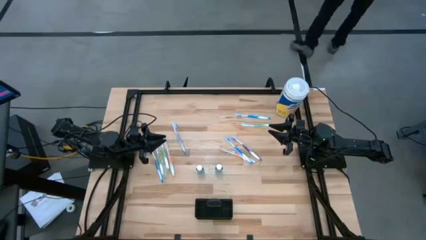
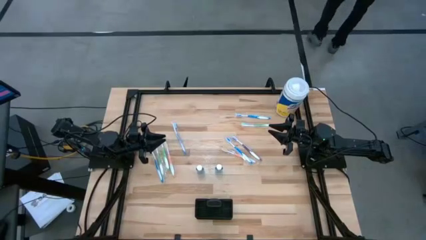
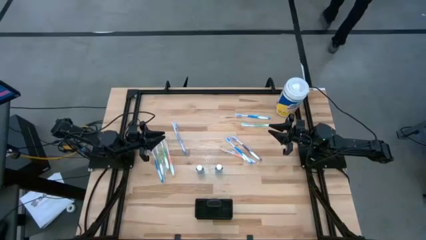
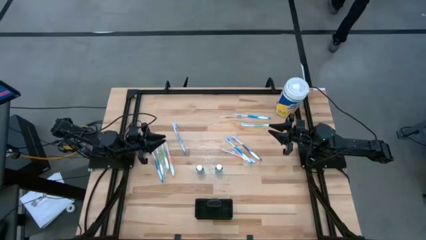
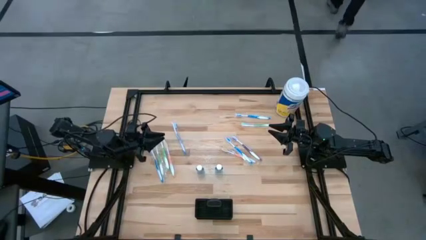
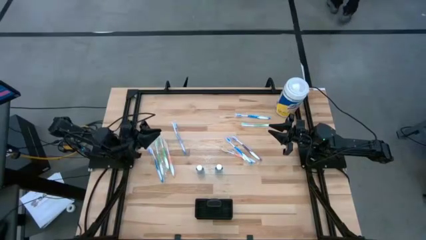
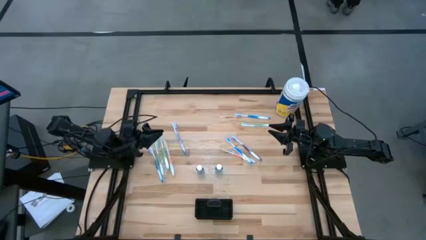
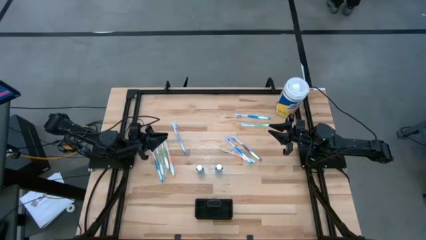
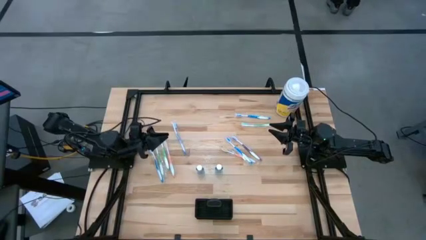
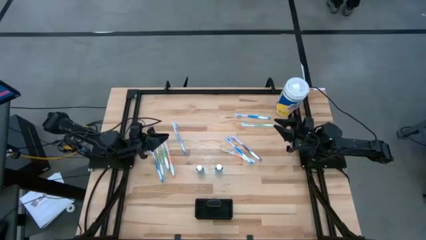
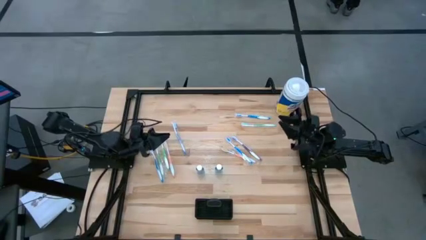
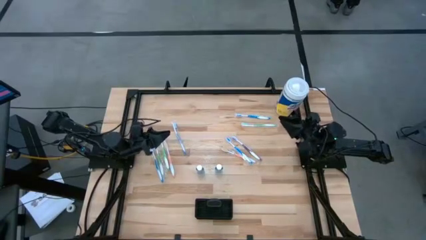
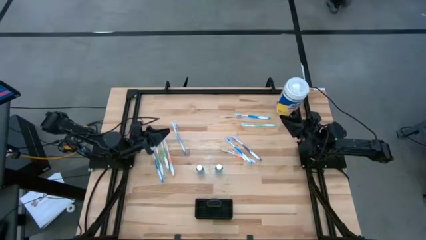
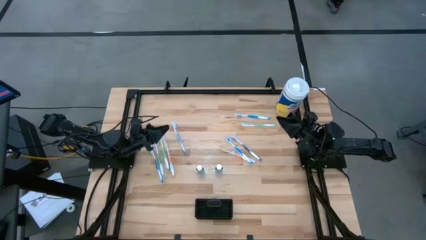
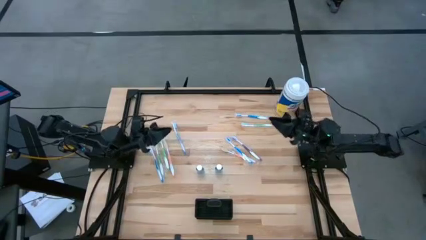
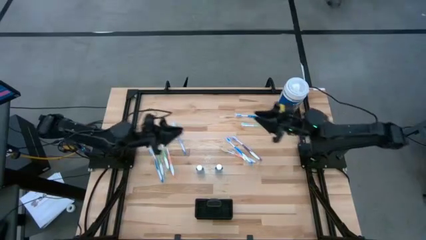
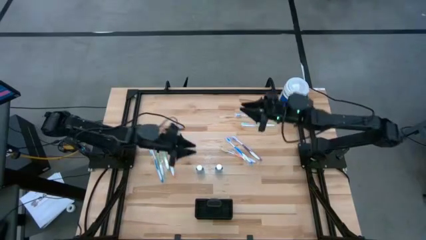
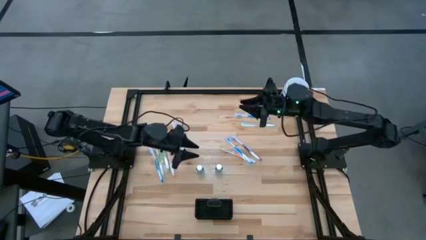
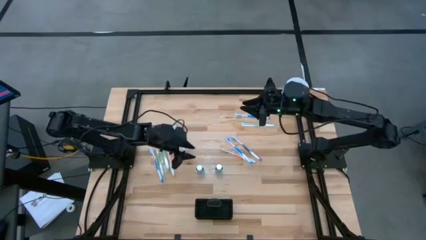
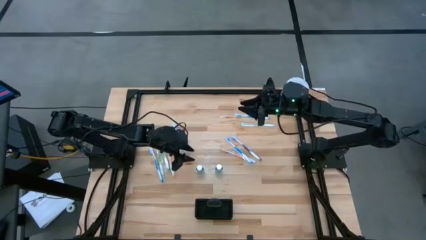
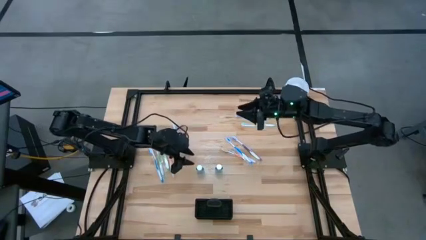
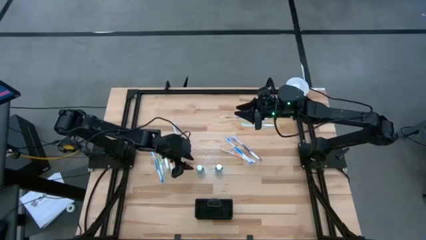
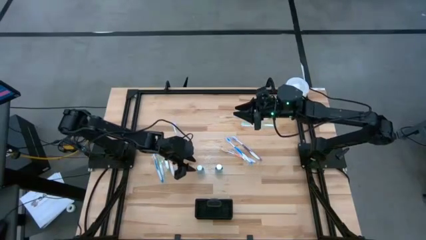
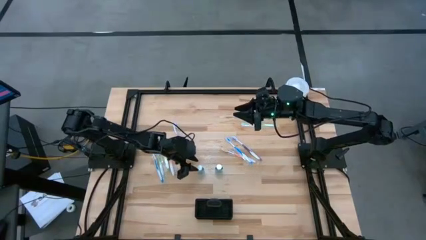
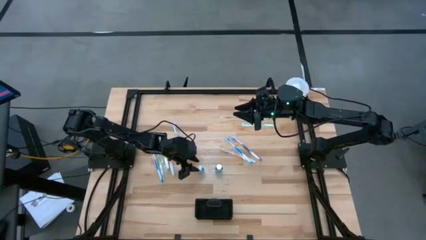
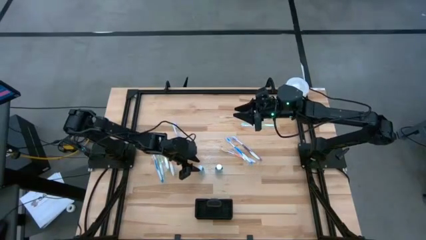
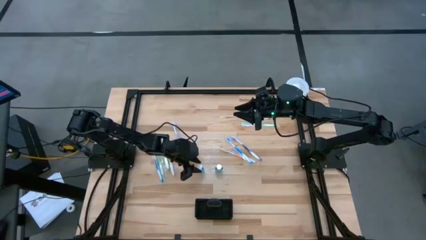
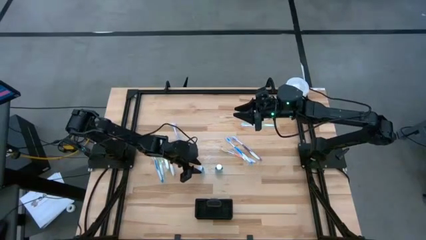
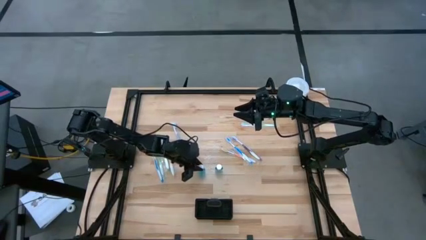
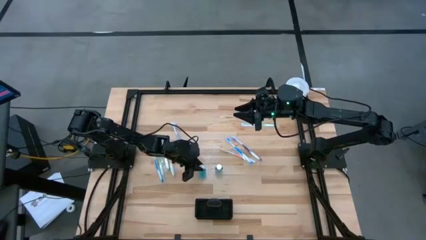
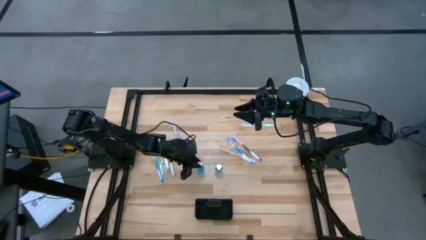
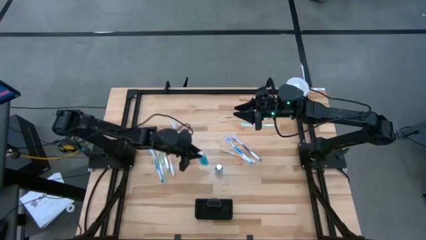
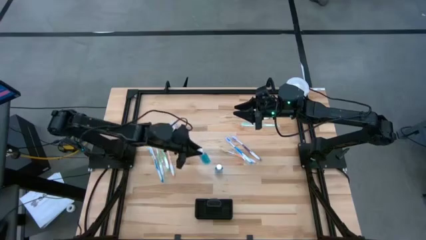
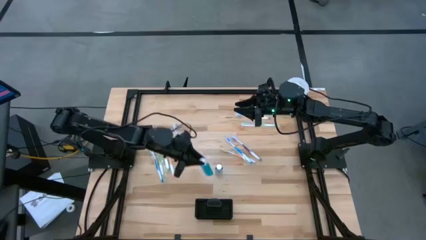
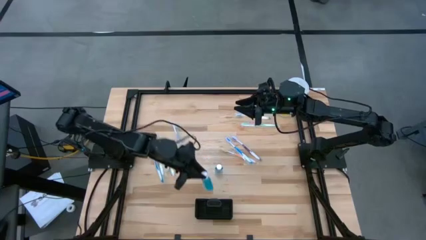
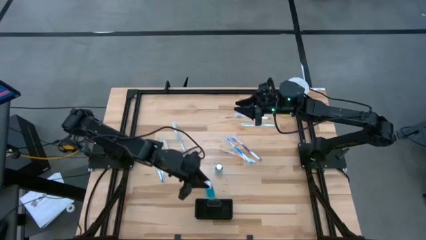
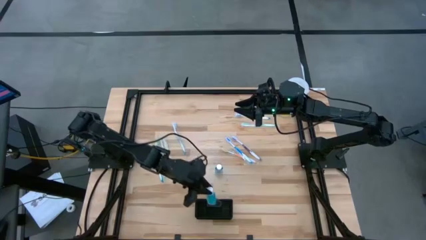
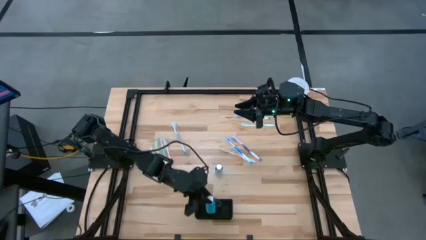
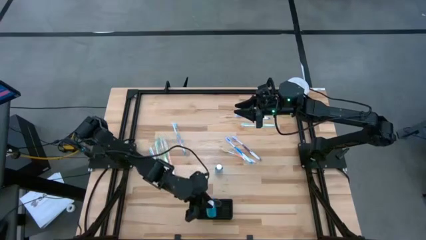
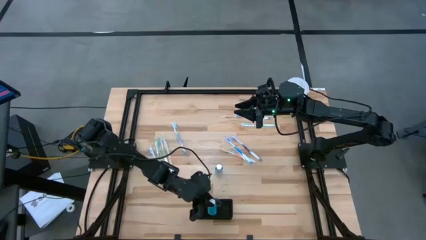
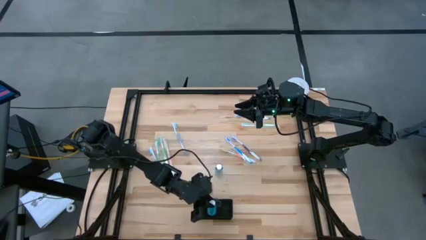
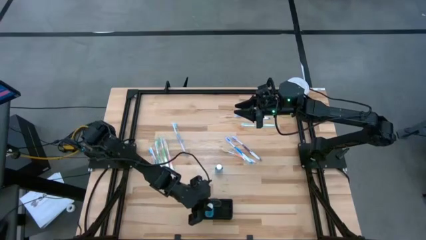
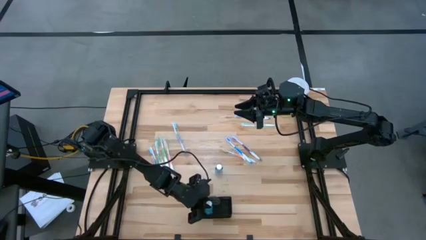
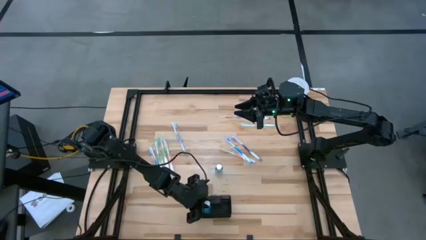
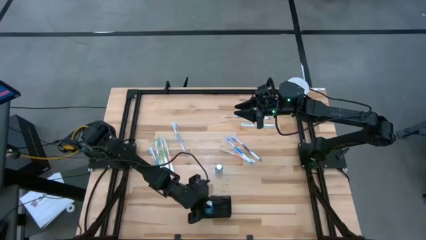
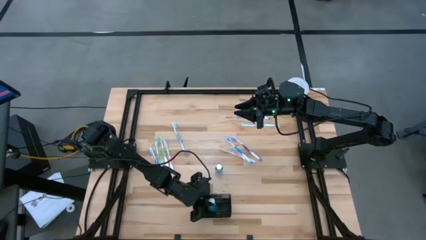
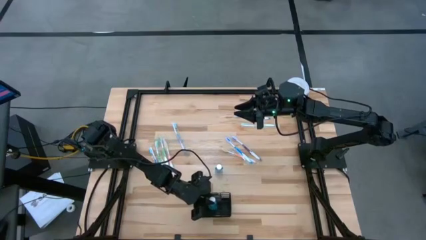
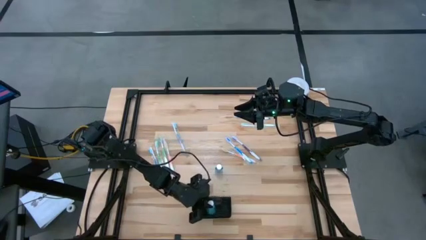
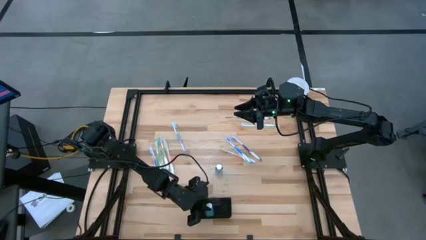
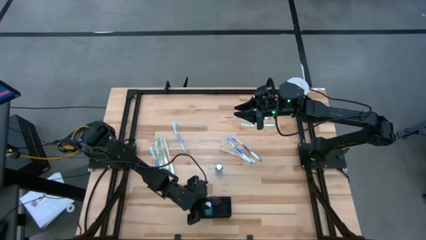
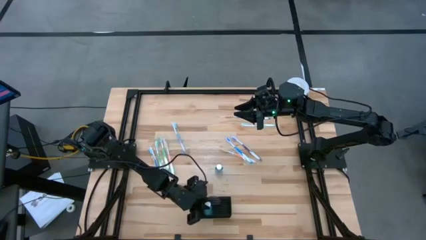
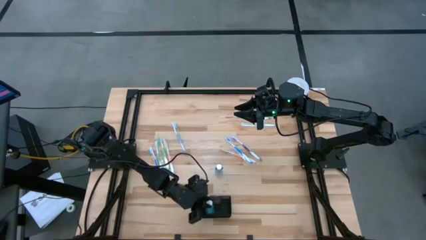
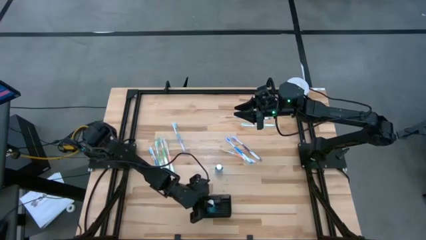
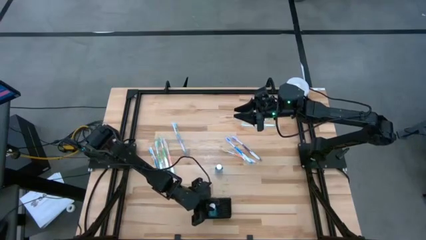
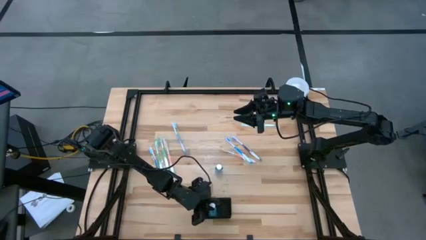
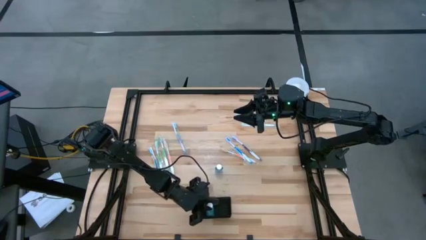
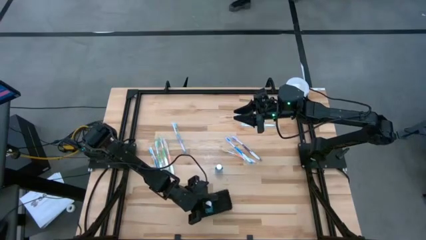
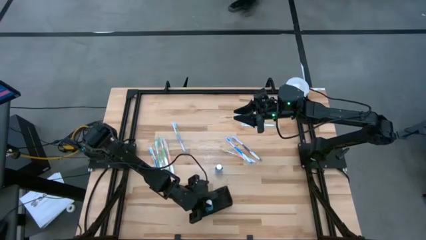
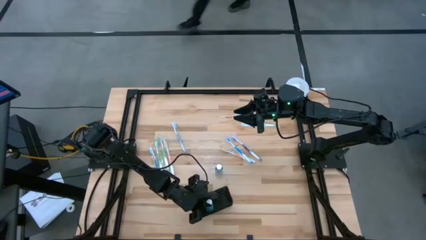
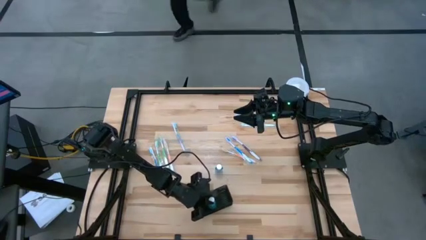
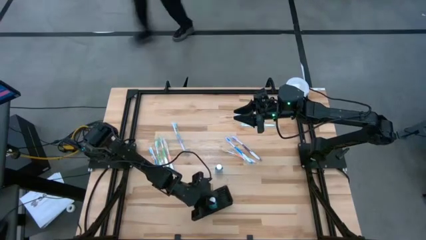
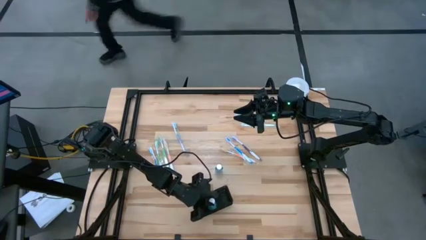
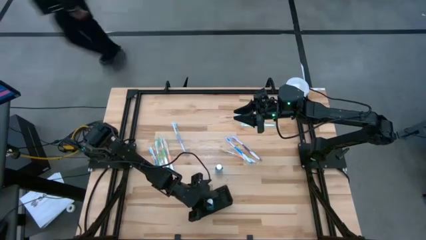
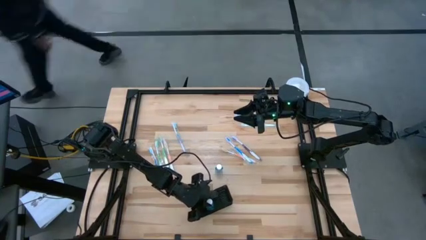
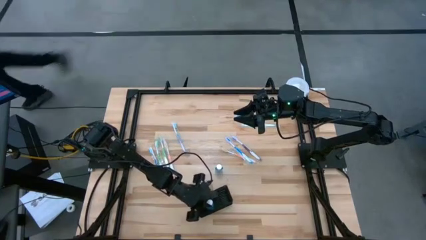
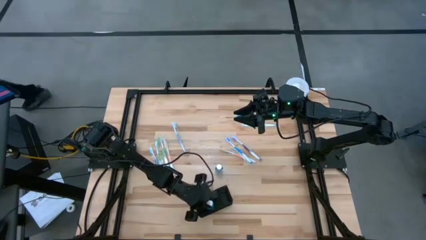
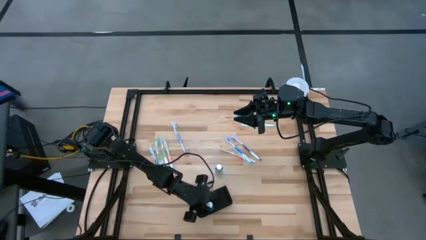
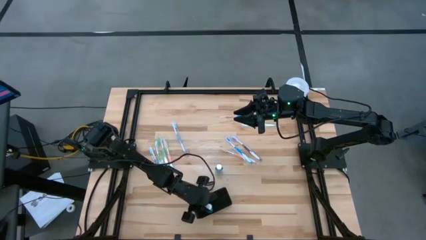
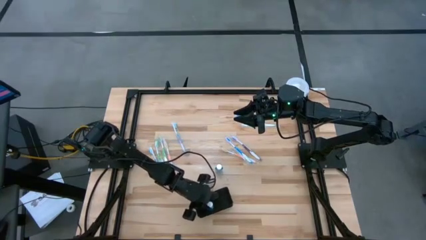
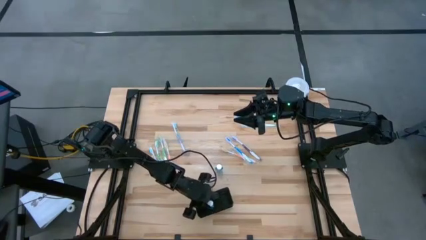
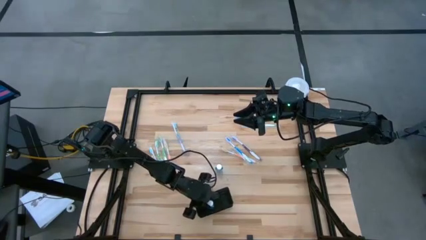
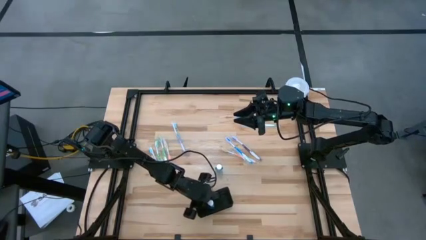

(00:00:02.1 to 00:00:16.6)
Task: Pick & Place toothbrushing station
Put the mouthwash into the mesh organizer
